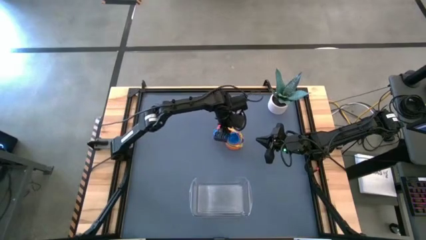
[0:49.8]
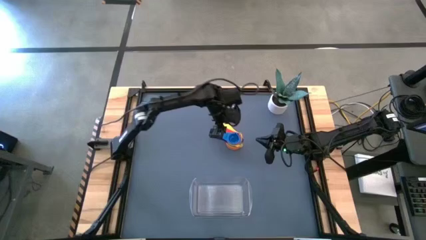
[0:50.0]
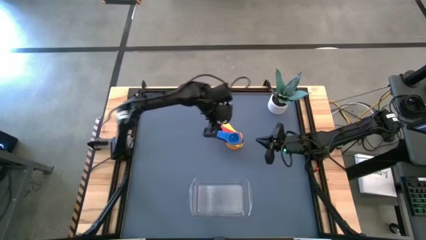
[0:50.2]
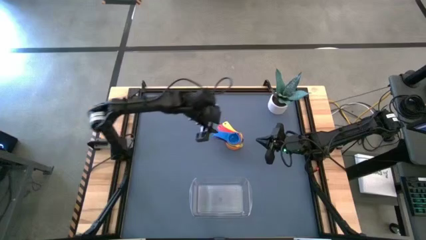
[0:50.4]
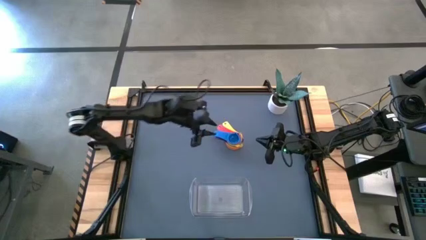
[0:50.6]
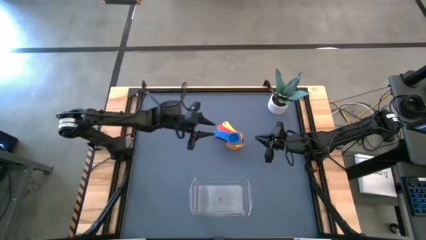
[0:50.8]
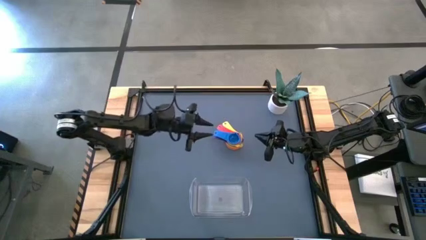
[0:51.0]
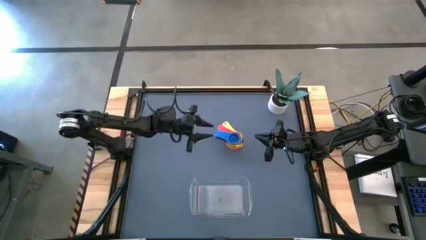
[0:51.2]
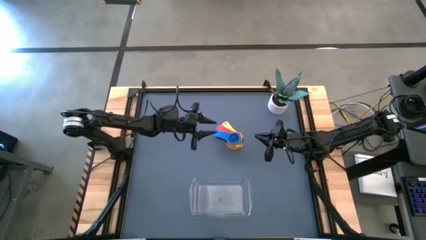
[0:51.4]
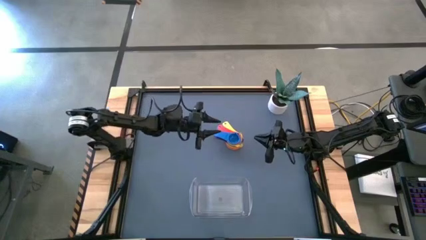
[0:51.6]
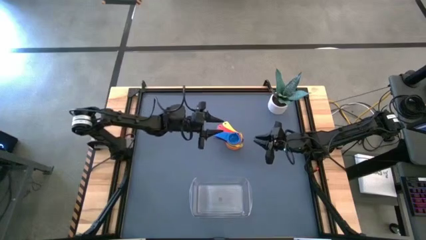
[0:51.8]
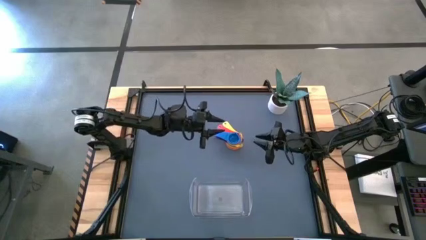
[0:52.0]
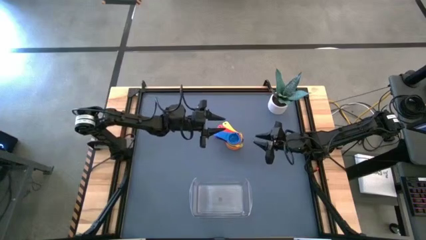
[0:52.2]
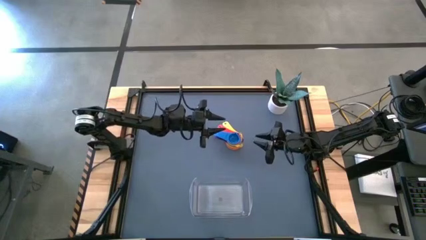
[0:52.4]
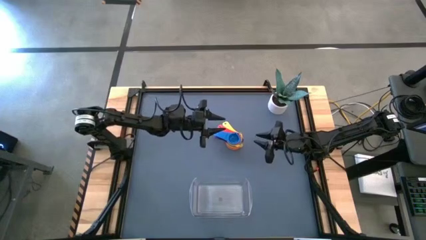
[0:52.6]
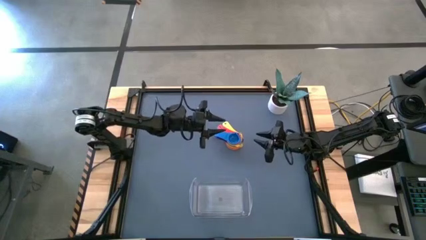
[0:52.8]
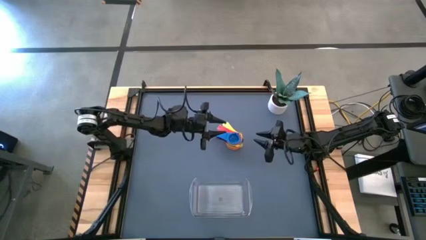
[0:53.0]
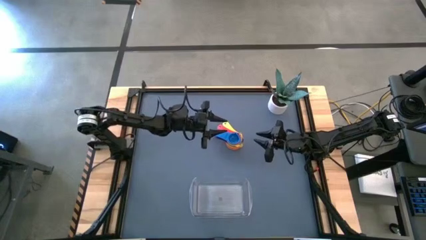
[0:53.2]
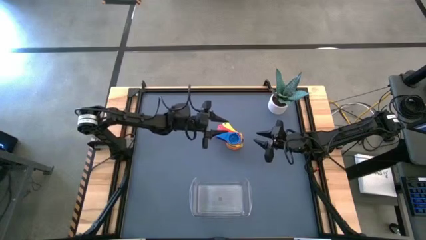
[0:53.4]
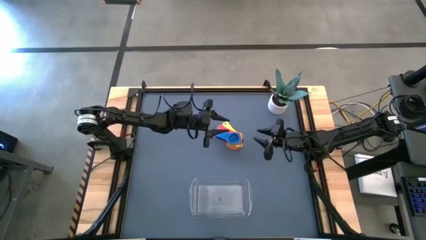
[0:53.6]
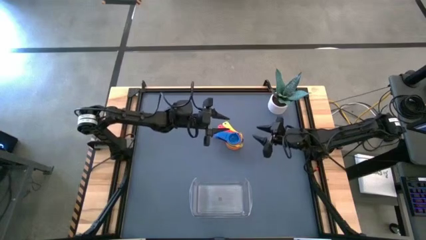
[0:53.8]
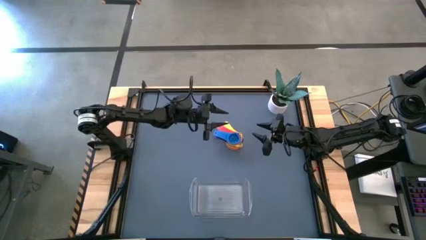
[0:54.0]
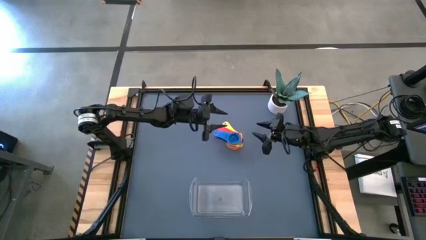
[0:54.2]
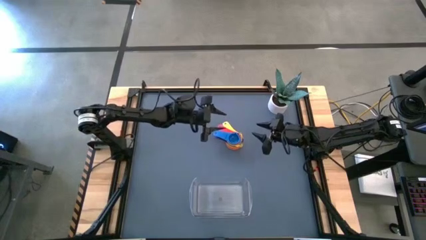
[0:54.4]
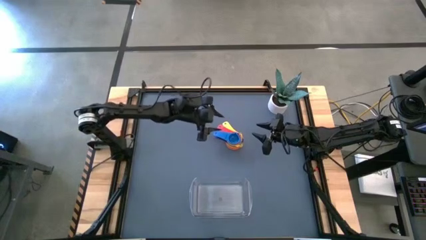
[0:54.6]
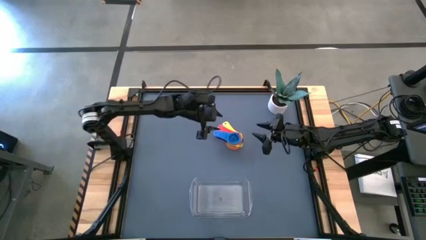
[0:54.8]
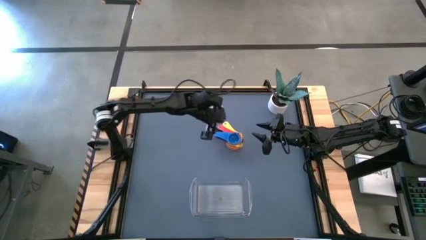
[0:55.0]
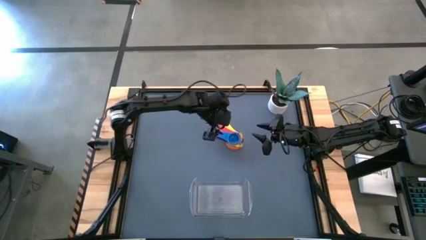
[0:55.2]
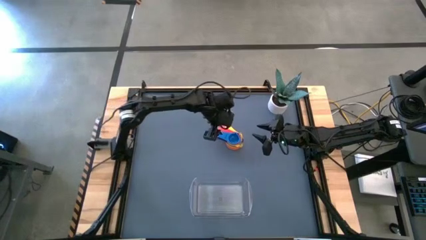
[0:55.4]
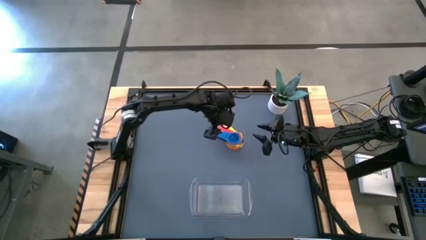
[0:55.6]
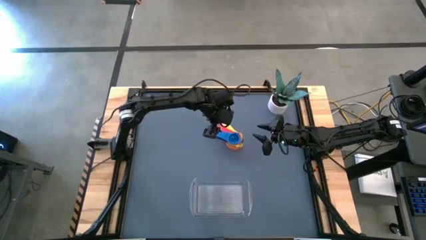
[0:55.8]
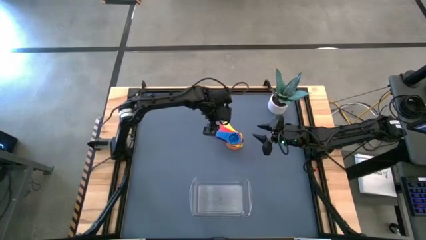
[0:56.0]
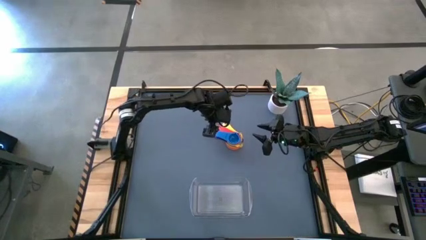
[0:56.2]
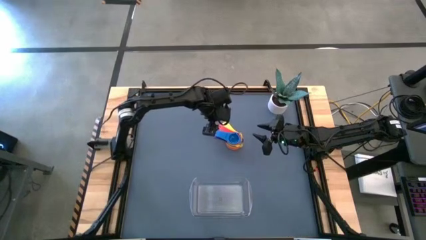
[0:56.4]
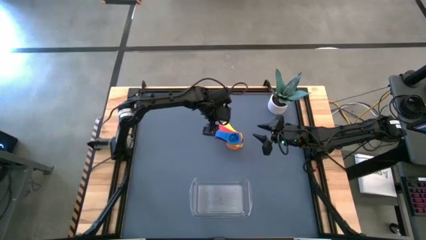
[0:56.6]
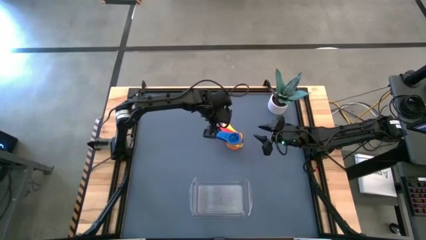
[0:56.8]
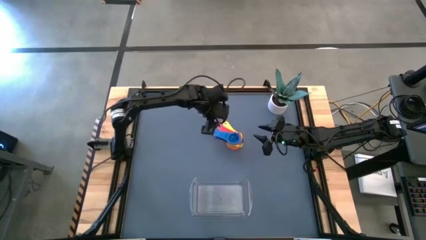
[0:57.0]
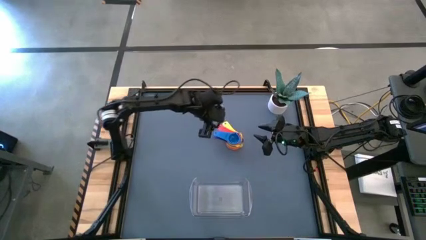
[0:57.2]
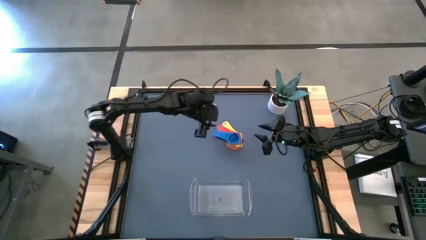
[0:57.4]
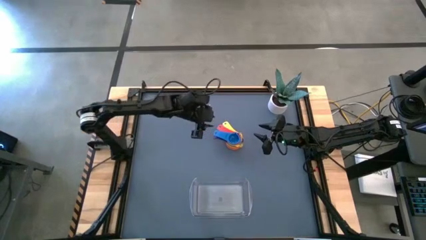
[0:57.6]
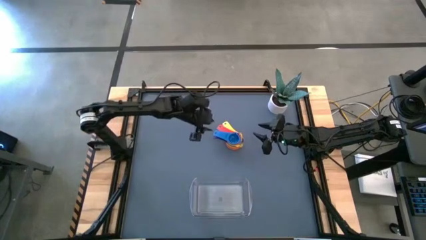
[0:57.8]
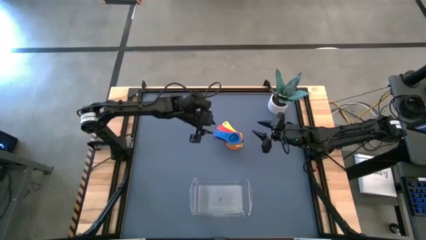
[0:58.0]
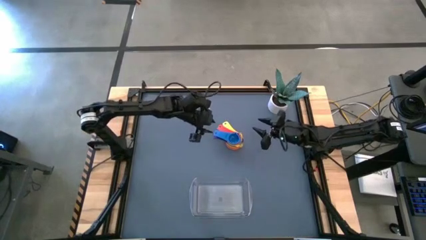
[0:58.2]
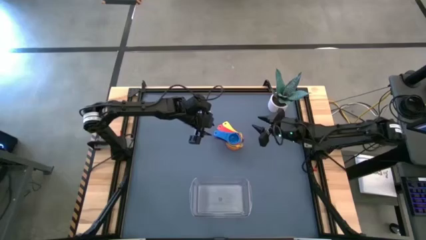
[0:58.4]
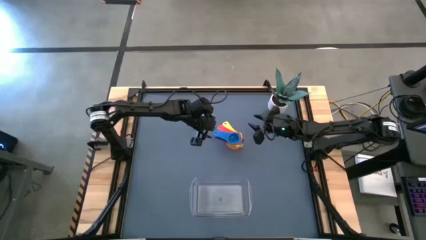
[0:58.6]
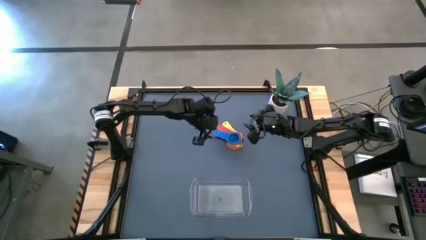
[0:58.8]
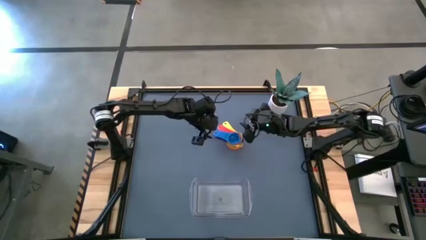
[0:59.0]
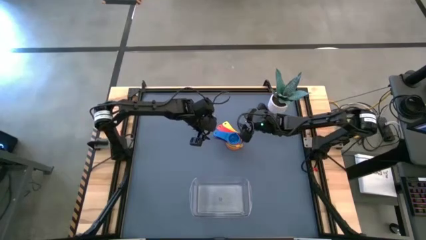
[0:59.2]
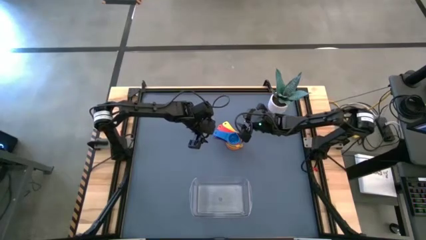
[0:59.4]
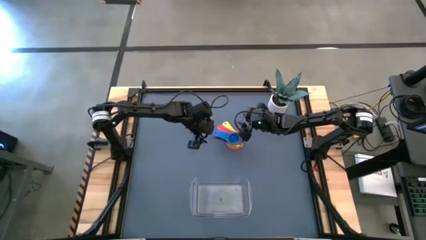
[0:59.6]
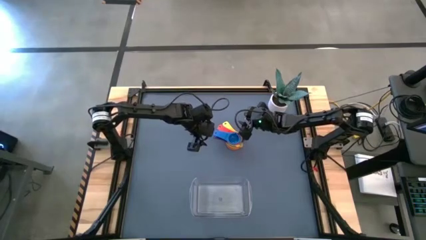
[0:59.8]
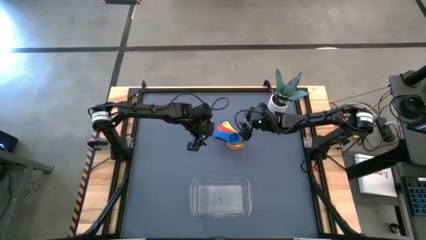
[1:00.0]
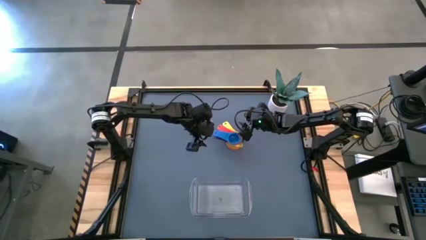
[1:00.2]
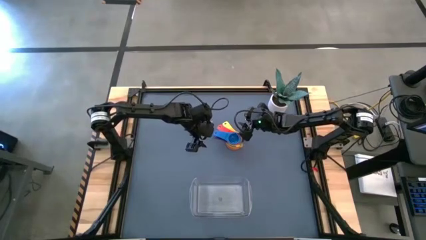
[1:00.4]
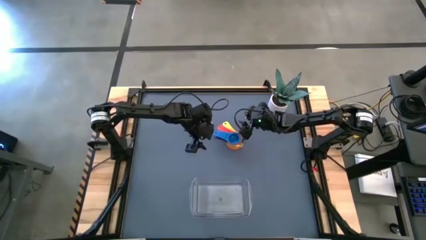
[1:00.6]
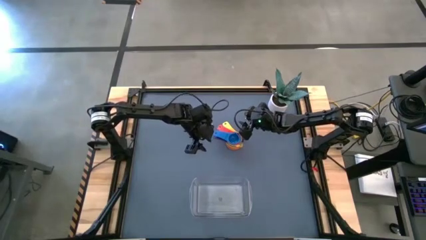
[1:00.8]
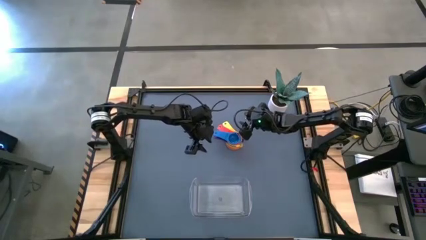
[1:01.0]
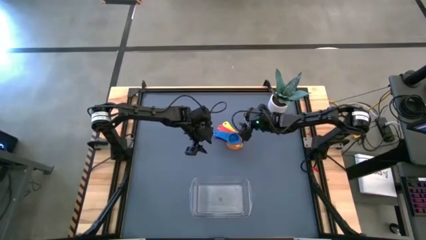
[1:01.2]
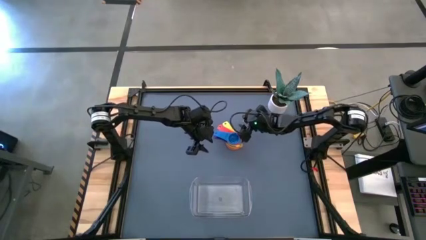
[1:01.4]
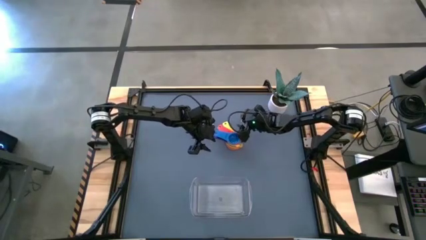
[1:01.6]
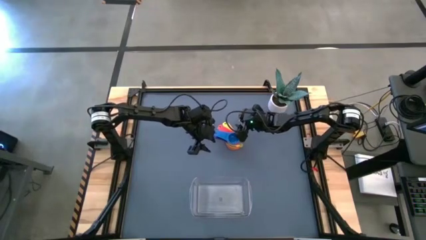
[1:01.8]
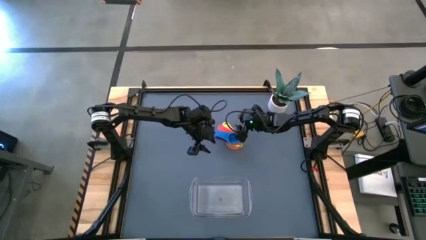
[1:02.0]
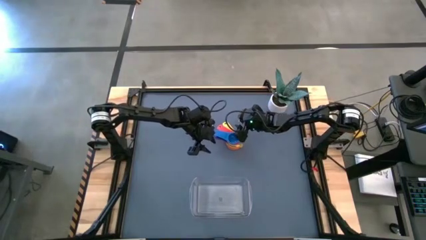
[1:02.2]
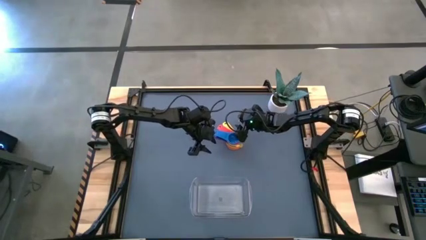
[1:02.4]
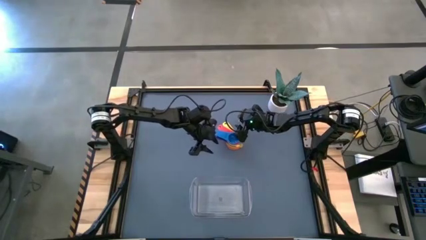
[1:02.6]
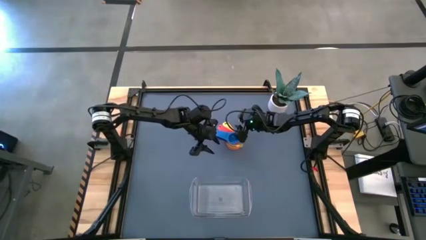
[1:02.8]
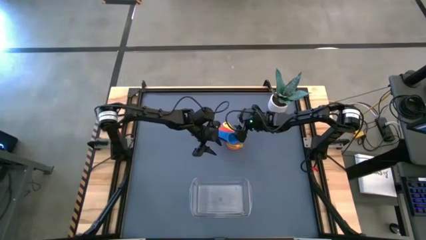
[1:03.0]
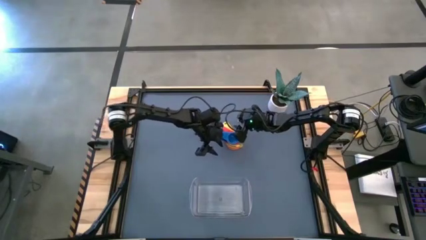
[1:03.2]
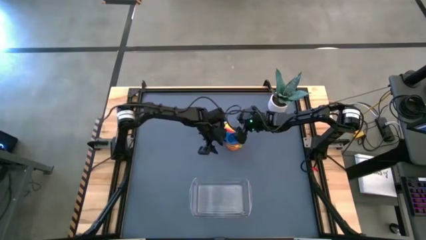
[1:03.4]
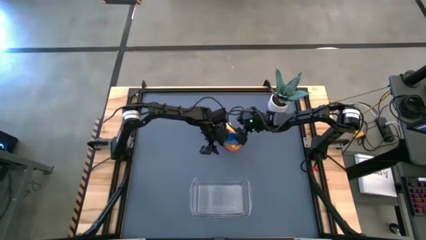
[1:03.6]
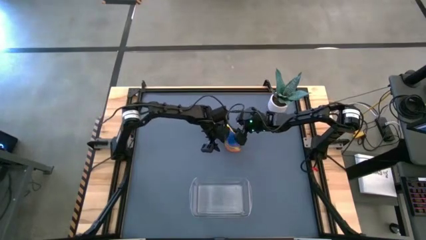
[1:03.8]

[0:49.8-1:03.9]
Task: Nest measuring cups in basket
Adjust the stacked measuring cups on the table
